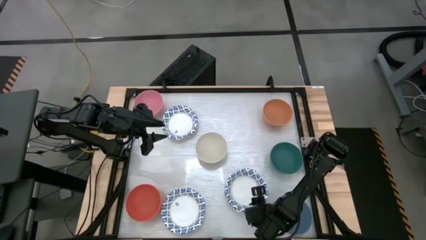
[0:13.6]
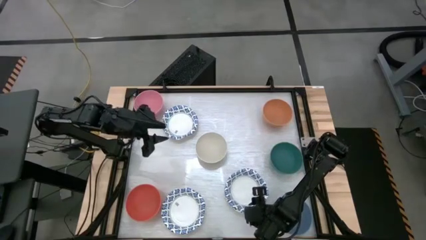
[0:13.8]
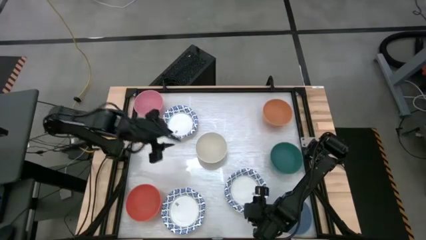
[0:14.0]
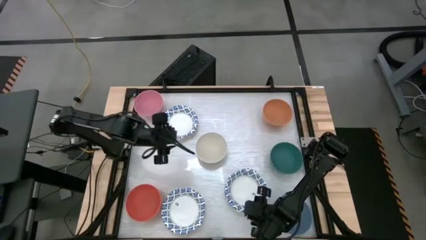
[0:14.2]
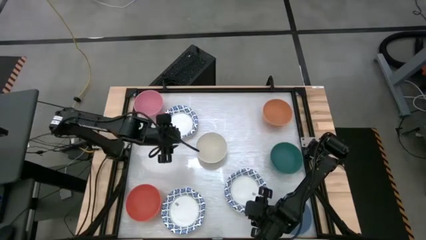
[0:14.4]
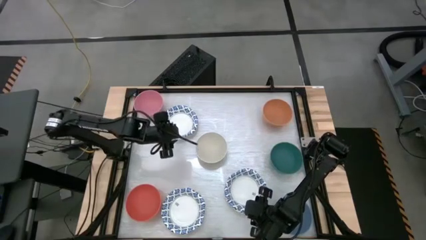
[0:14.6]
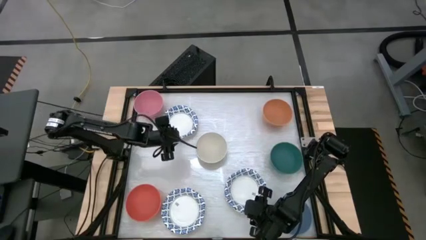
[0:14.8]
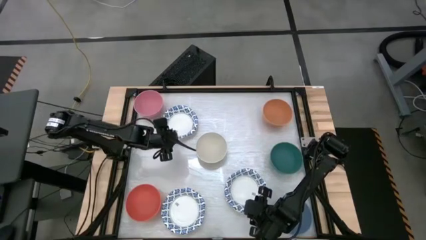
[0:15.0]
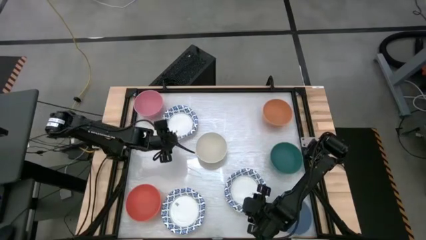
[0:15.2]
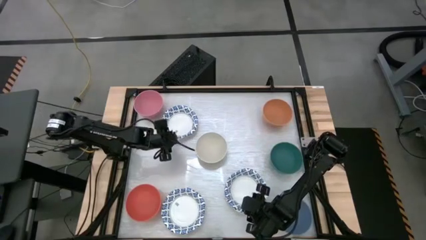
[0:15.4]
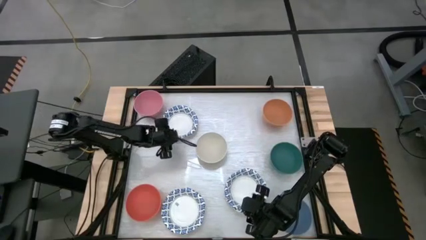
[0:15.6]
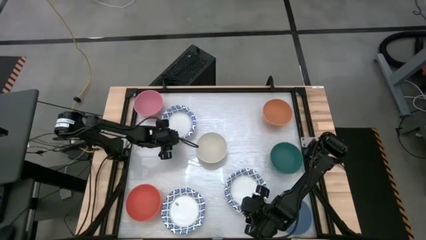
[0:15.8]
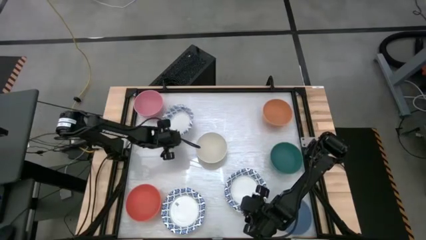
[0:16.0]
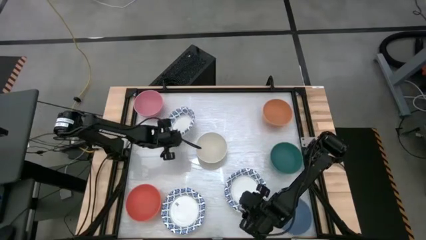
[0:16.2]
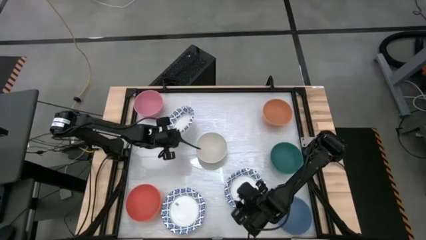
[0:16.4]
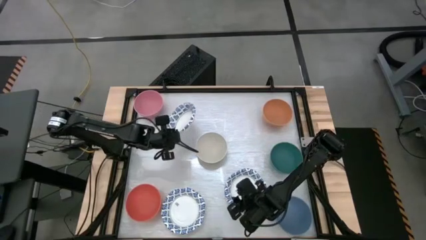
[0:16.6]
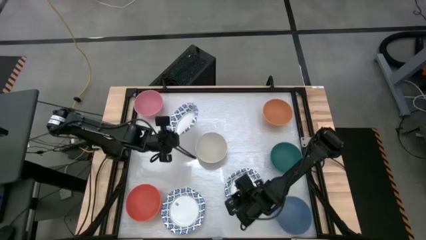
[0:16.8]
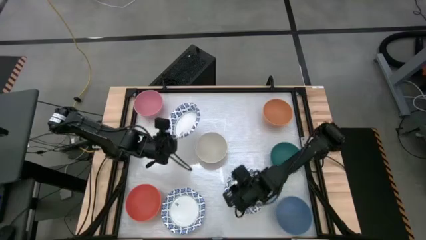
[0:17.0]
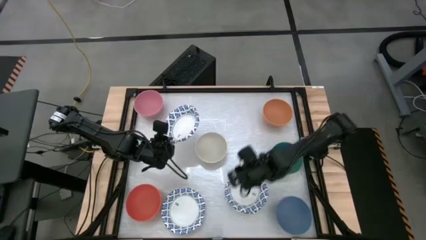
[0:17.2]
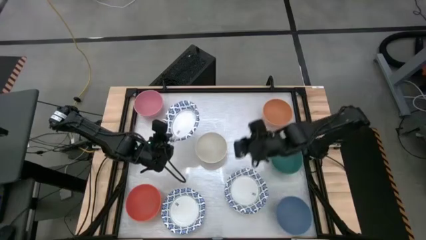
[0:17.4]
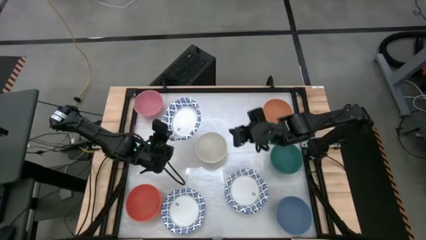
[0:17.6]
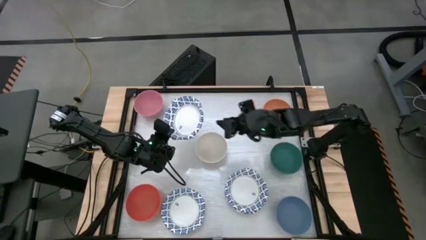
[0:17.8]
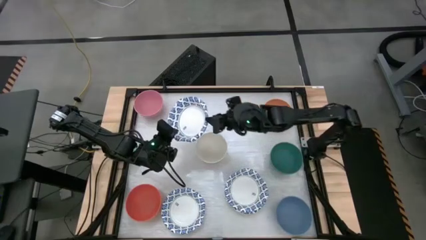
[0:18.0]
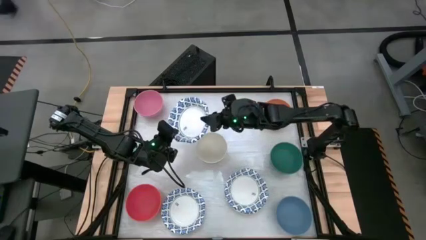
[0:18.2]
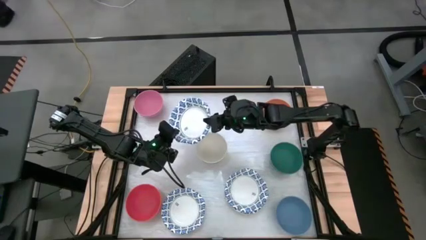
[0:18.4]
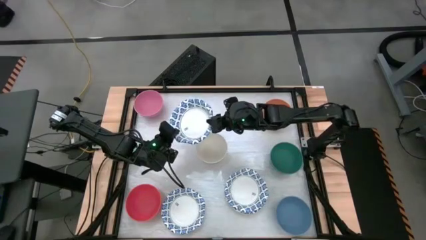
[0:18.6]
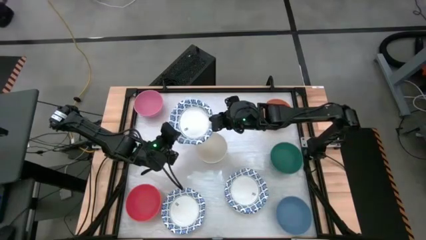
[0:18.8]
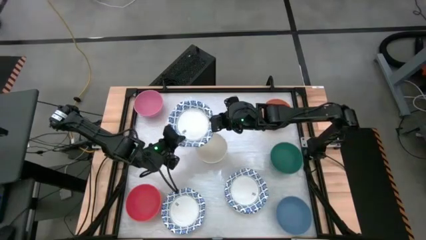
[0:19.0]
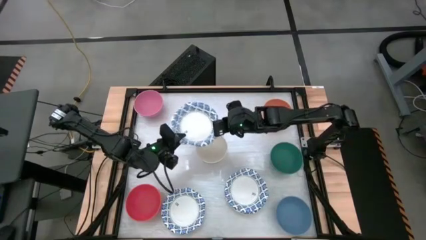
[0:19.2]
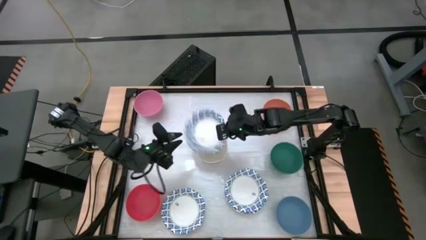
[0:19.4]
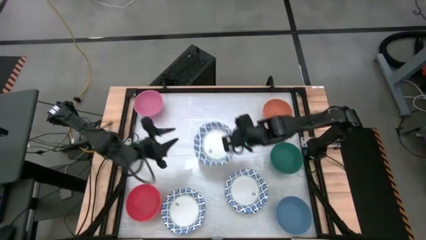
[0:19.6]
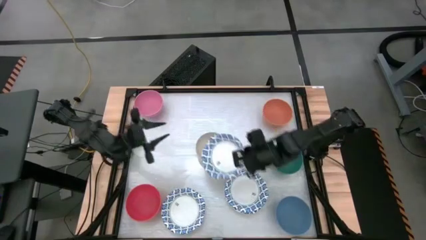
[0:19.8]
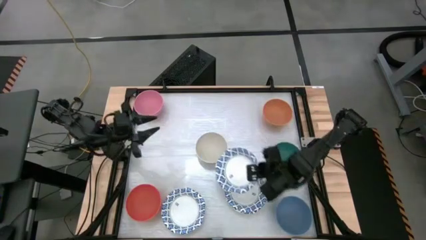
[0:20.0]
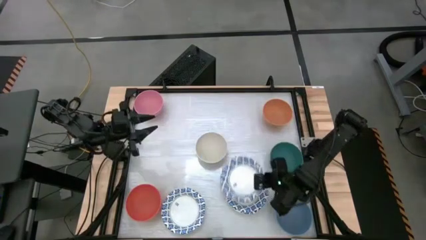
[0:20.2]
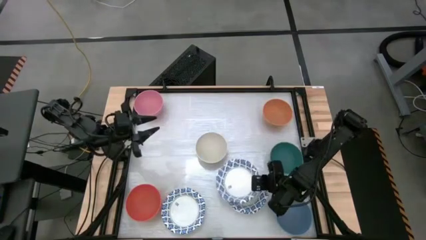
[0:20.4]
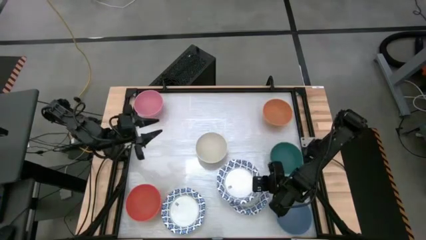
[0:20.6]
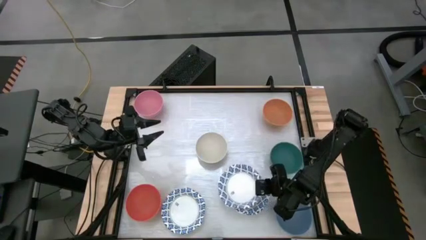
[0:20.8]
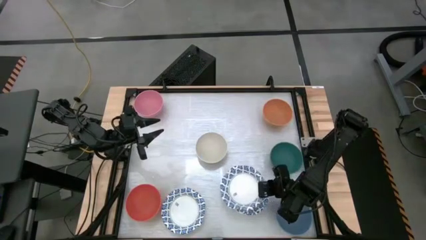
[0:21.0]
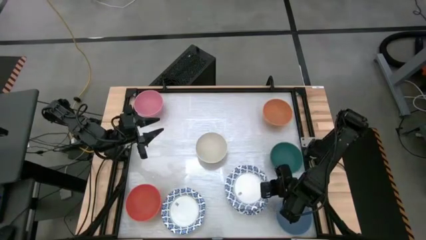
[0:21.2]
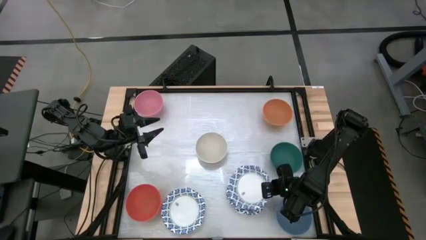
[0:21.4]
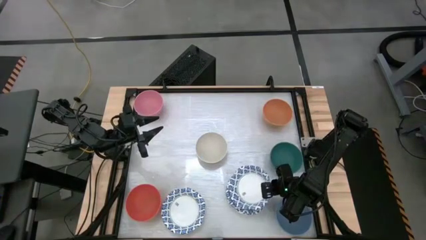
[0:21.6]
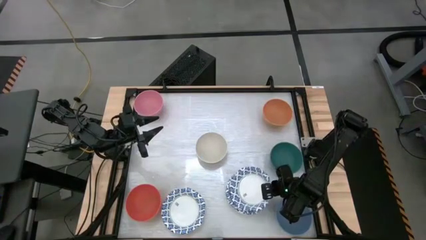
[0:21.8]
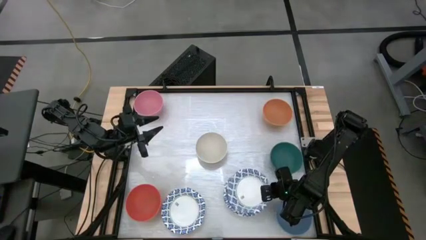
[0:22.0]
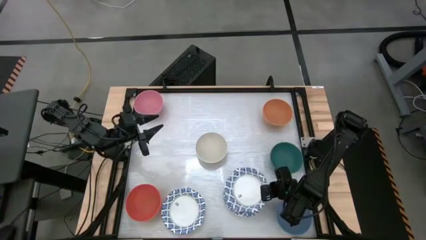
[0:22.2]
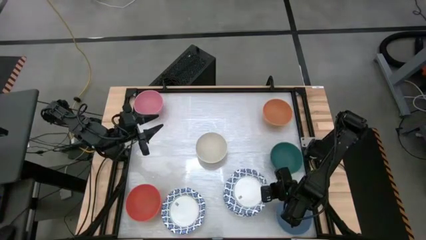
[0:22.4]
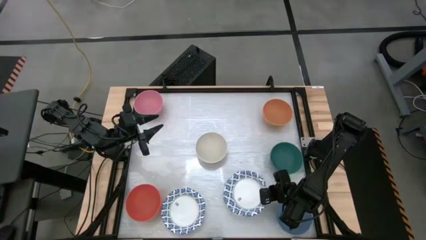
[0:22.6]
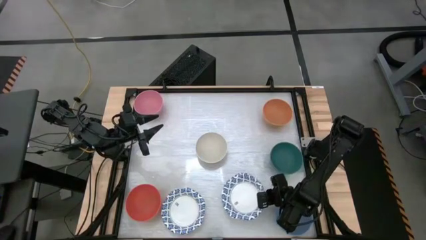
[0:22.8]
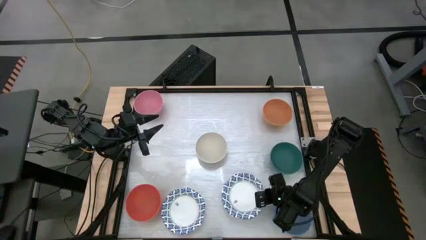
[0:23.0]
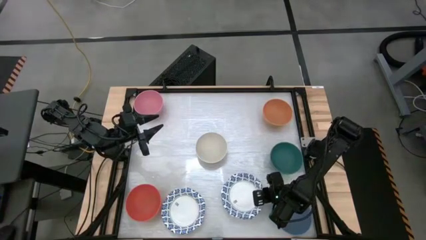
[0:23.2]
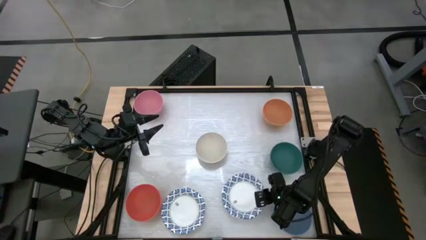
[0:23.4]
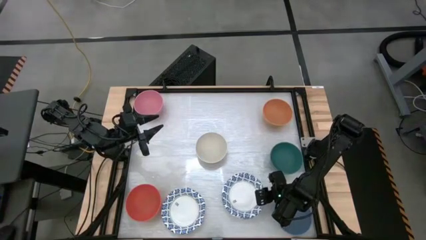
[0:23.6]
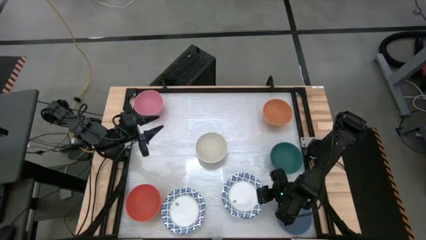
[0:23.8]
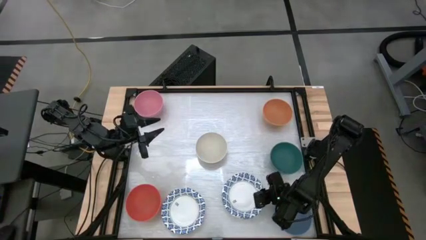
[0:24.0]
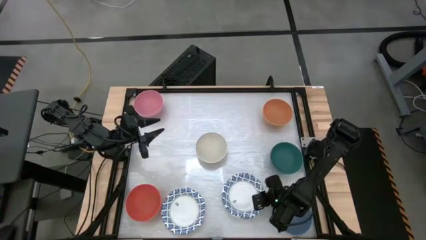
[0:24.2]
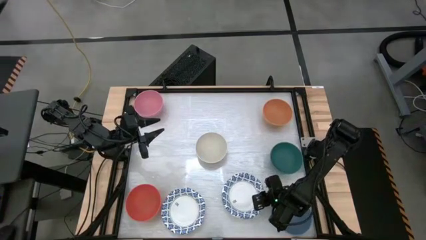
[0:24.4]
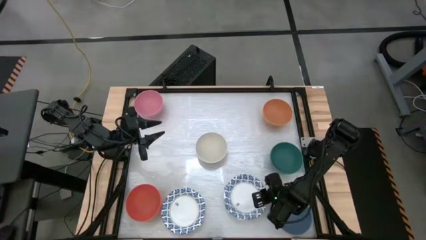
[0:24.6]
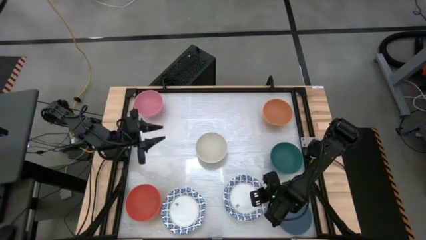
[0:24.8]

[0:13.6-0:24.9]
Stack the white patterned bowl on top of the white patterned bowl

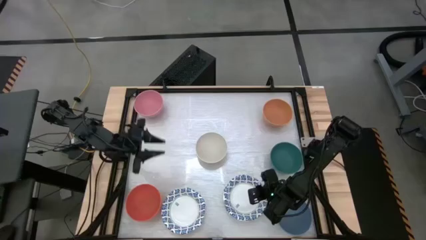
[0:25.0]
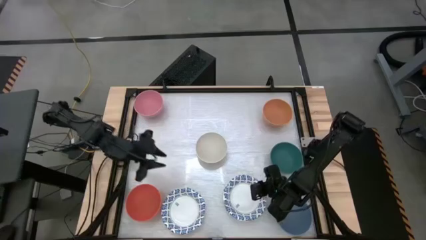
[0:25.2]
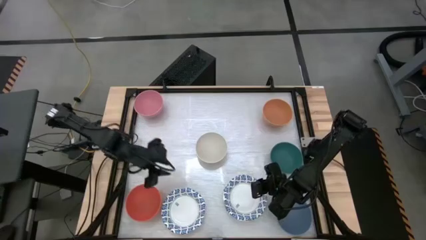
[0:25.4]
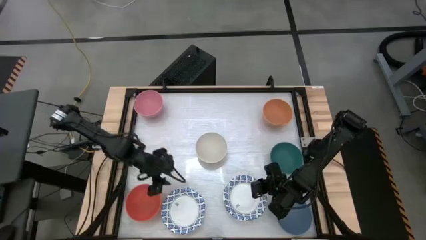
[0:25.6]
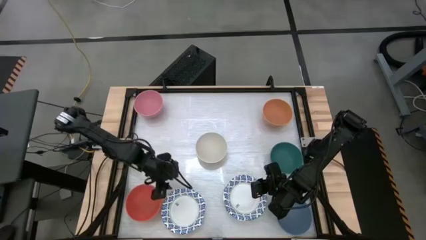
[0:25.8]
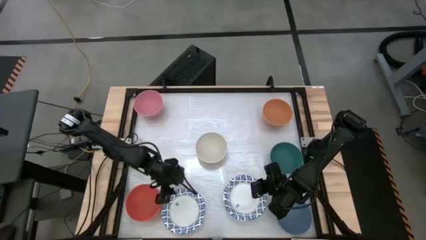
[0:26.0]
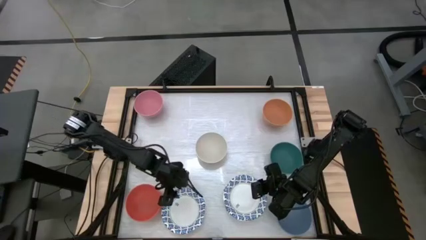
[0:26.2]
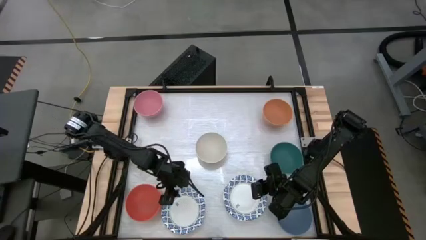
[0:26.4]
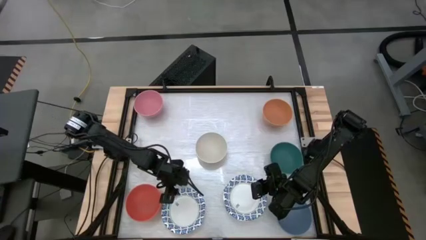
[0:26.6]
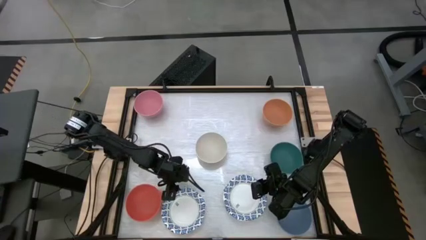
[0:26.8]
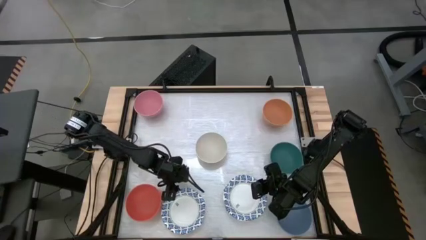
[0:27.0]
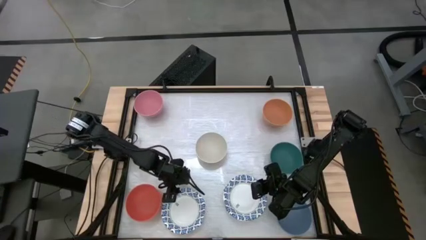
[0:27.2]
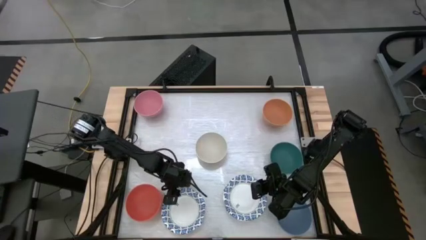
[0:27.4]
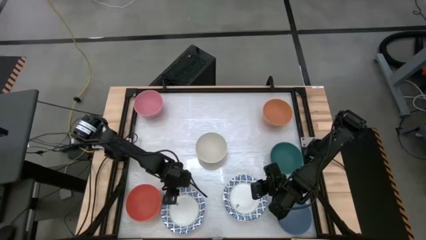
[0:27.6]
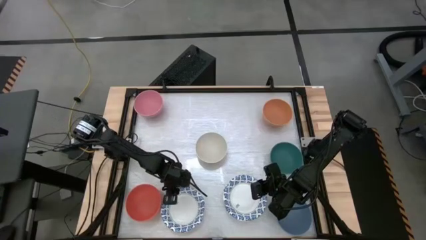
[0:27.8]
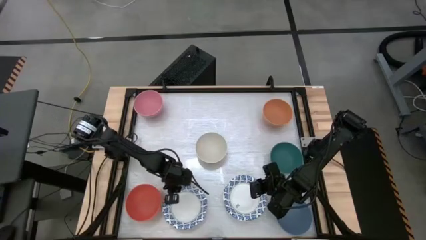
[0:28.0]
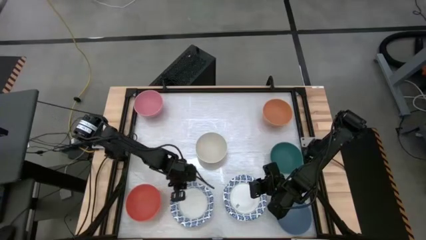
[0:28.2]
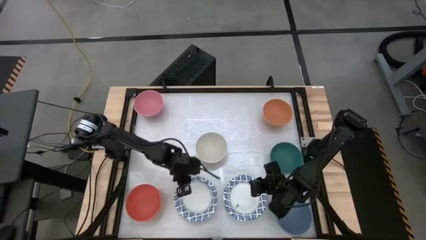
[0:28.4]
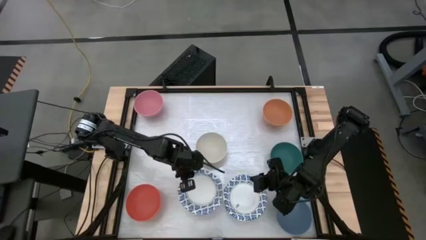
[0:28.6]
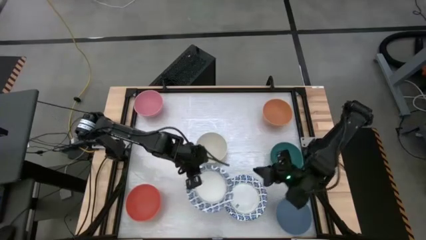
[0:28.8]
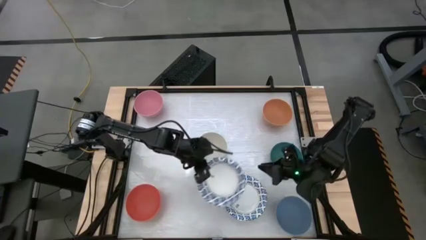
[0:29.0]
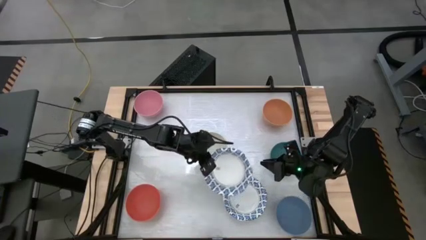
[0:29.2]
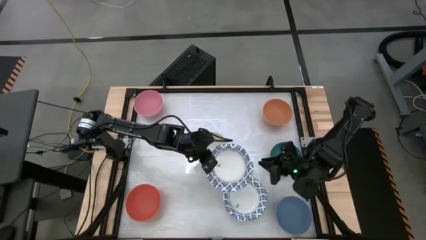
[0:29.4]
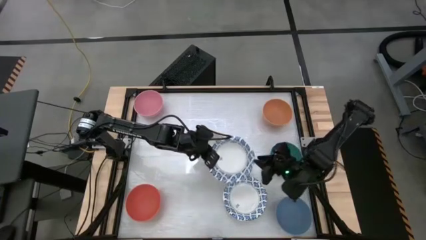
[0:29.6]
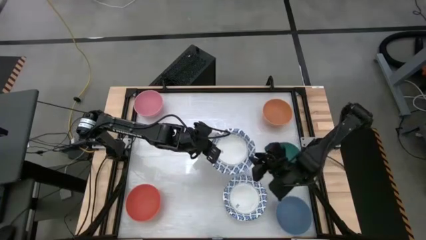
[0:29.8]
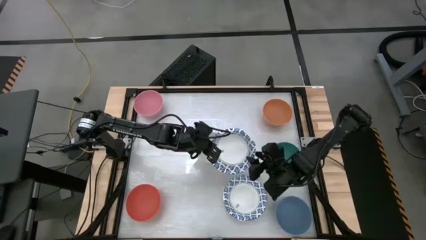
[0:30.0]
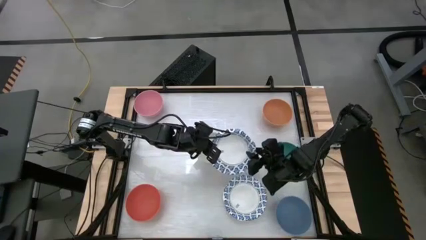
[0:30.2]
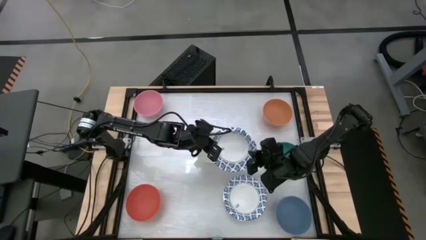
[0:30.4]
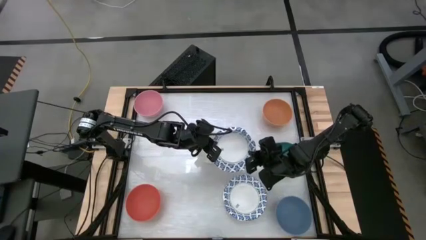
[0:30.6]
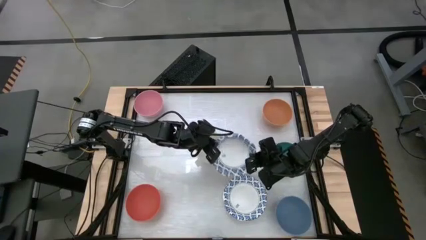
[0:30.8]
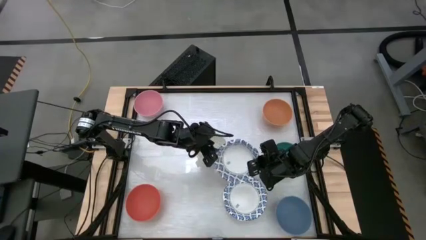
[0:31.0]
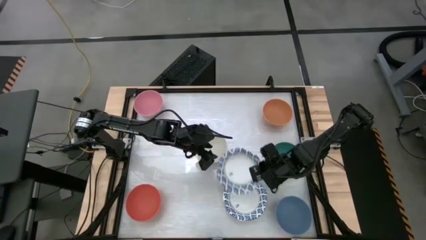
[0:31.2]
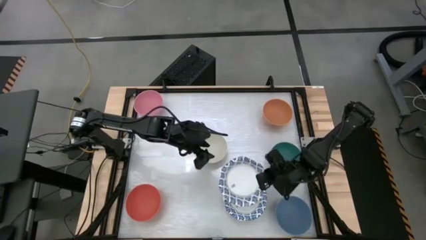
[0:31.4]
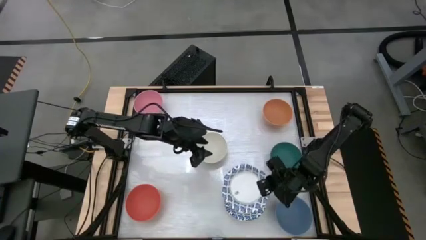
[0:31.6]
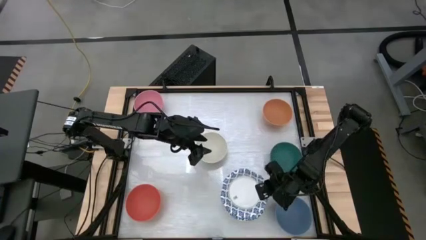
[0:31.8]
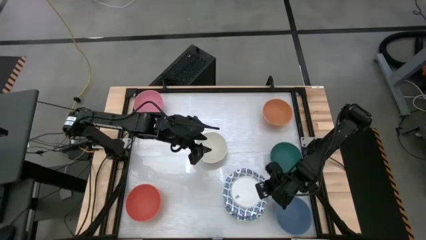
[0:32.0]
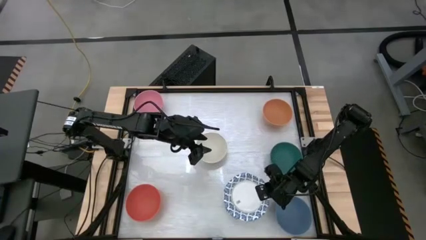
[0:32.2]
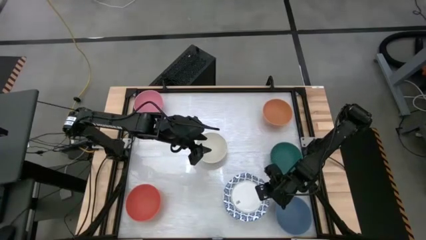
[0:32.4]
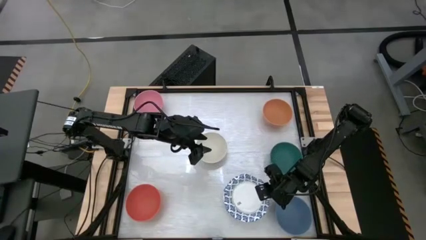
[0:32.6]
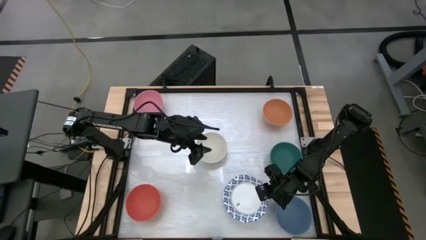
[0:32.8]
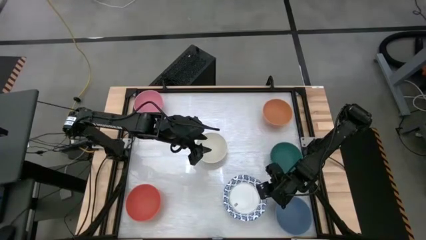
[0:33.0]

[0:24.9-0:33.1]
Stack the white patterned bowl on top of the white patterned bowl
